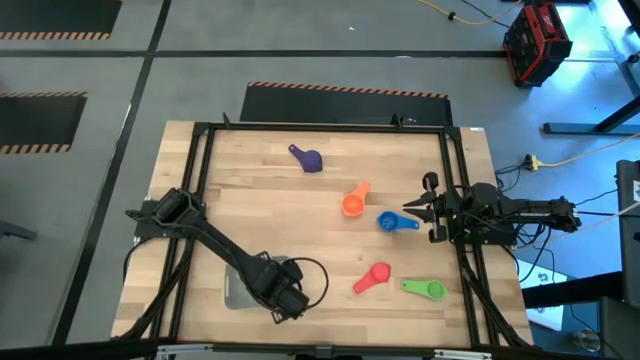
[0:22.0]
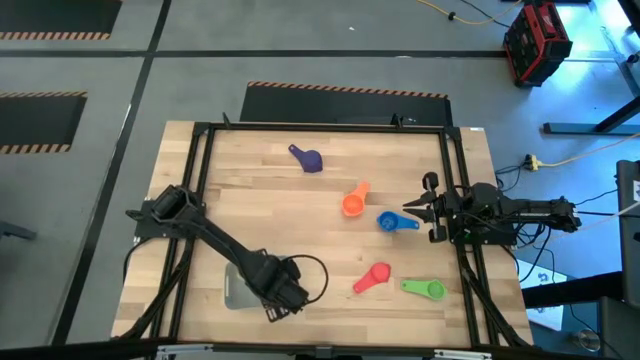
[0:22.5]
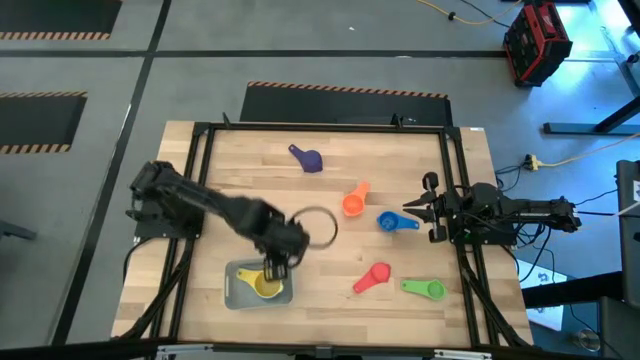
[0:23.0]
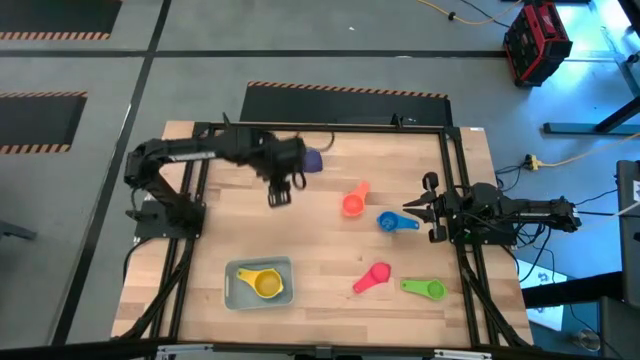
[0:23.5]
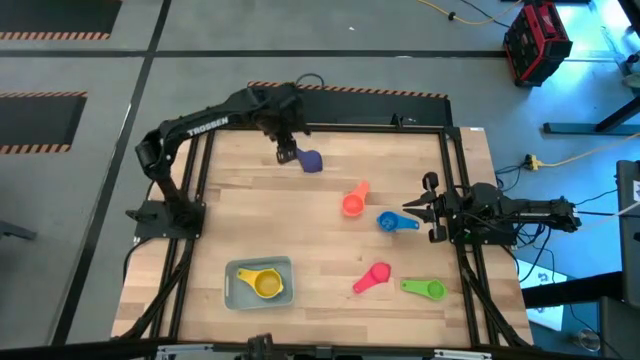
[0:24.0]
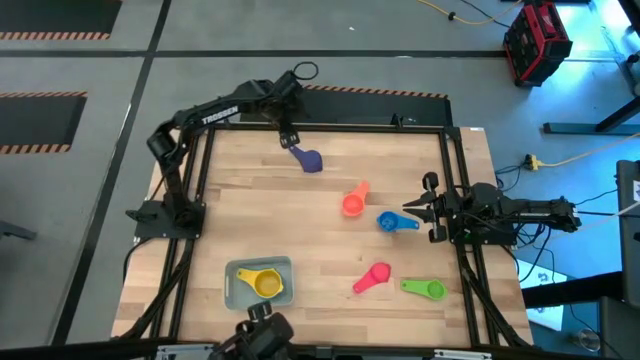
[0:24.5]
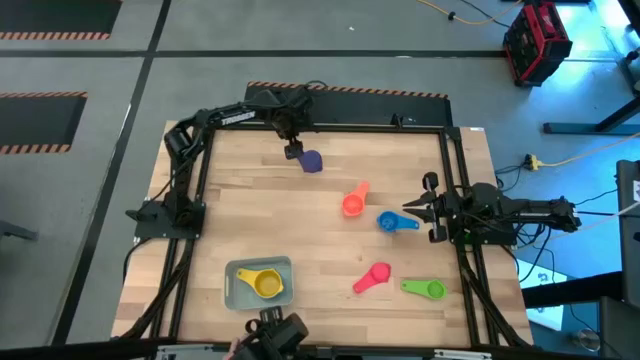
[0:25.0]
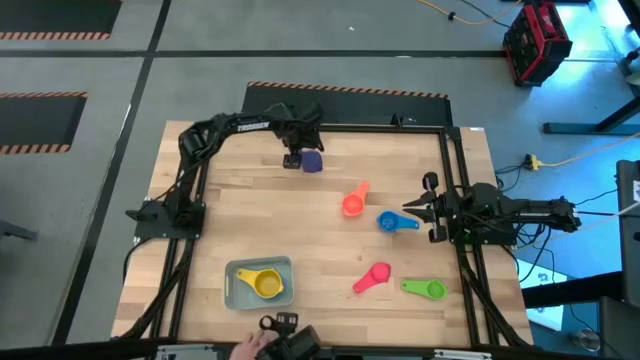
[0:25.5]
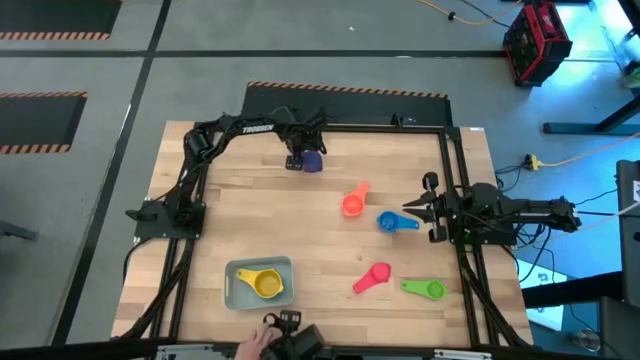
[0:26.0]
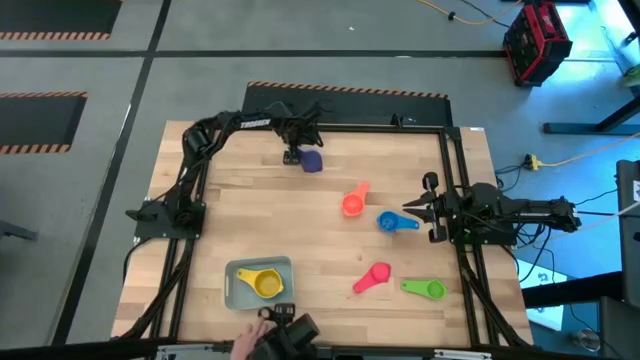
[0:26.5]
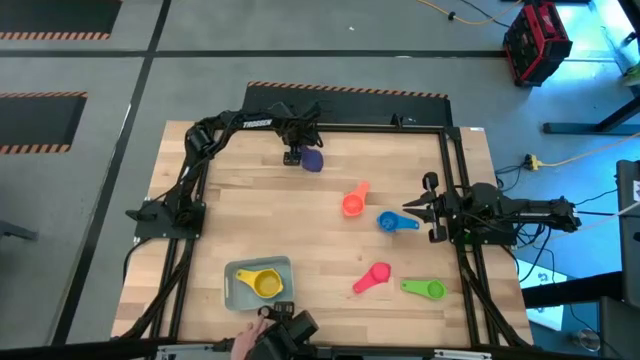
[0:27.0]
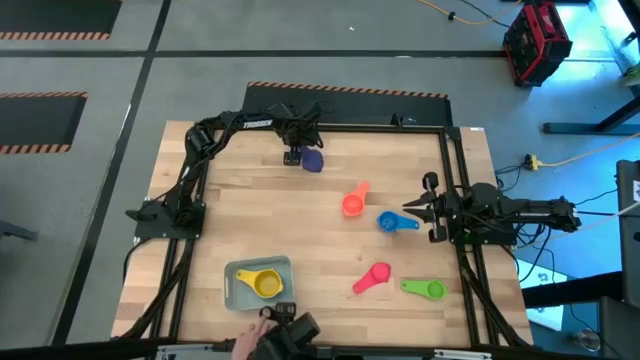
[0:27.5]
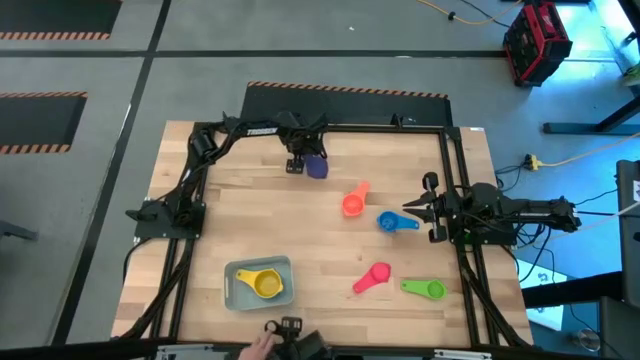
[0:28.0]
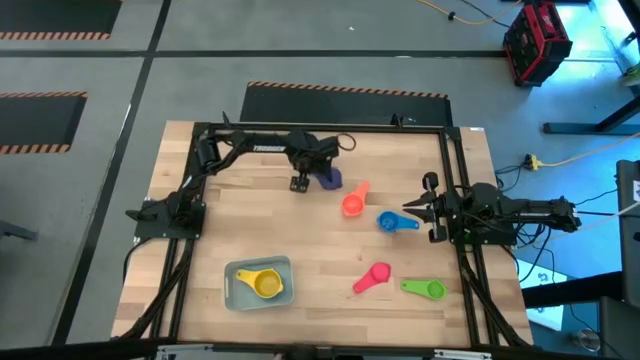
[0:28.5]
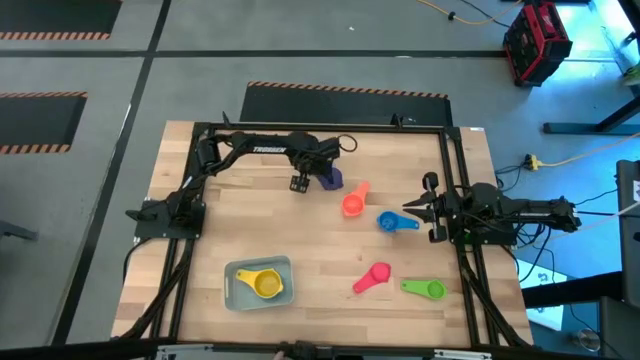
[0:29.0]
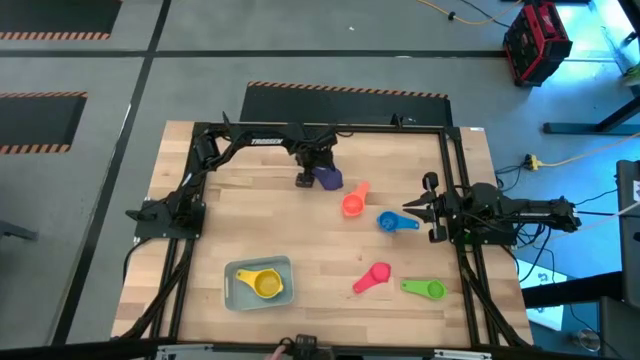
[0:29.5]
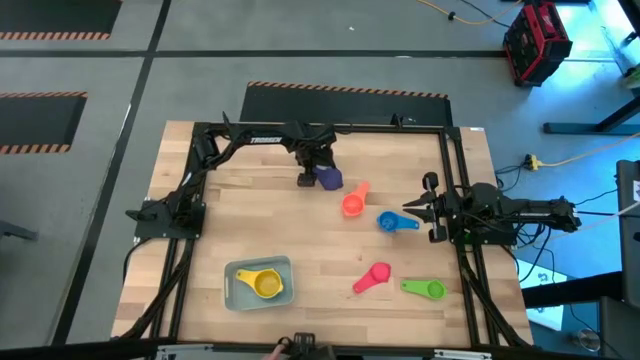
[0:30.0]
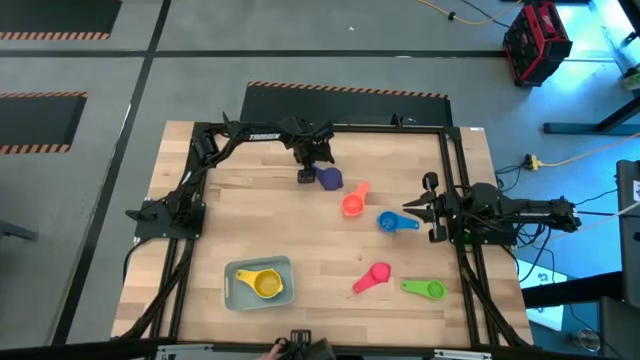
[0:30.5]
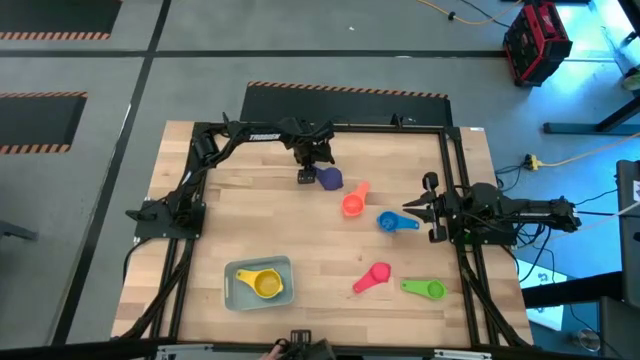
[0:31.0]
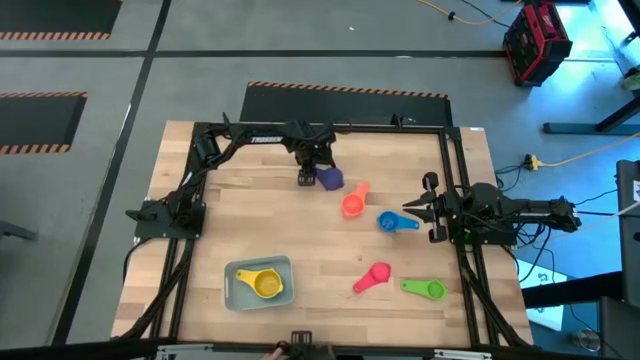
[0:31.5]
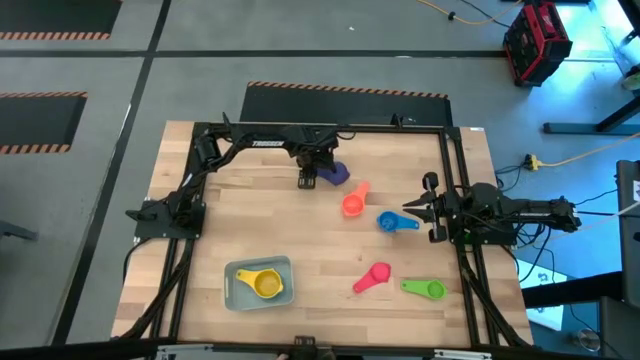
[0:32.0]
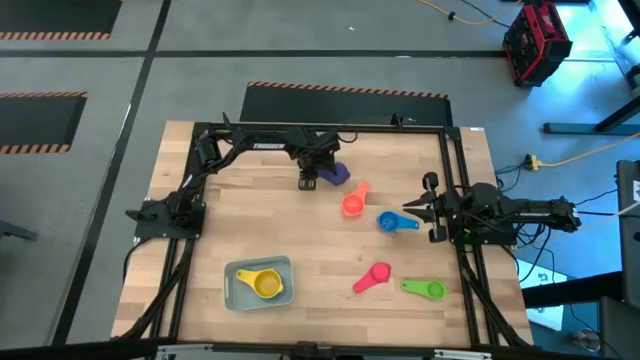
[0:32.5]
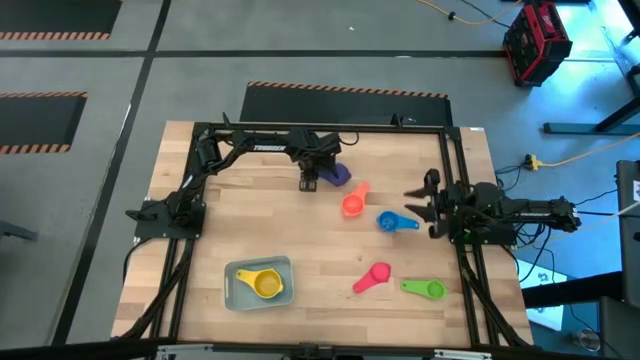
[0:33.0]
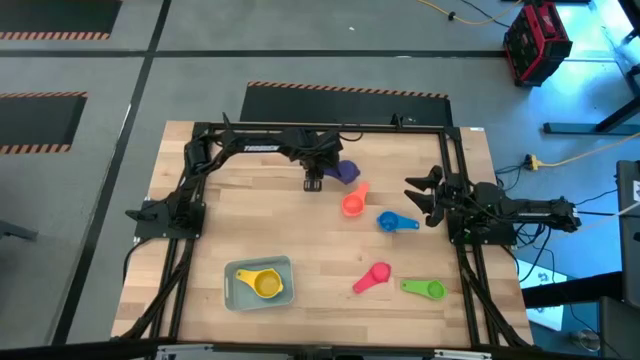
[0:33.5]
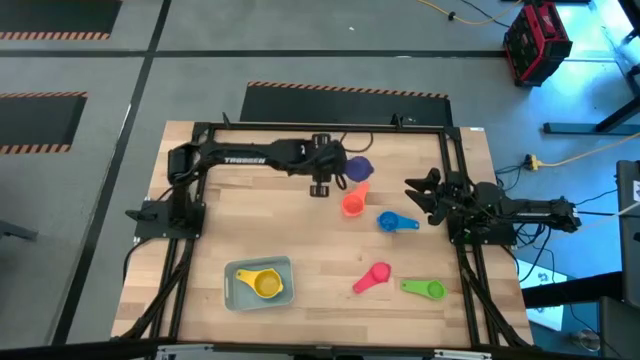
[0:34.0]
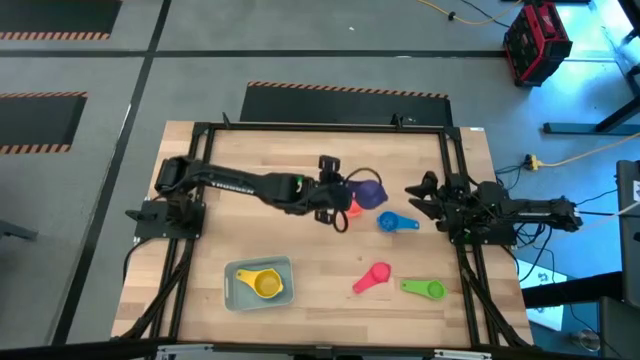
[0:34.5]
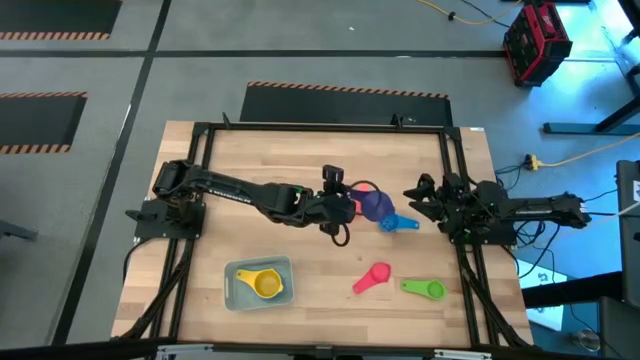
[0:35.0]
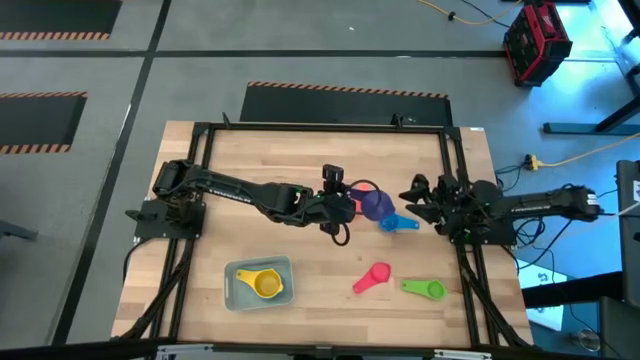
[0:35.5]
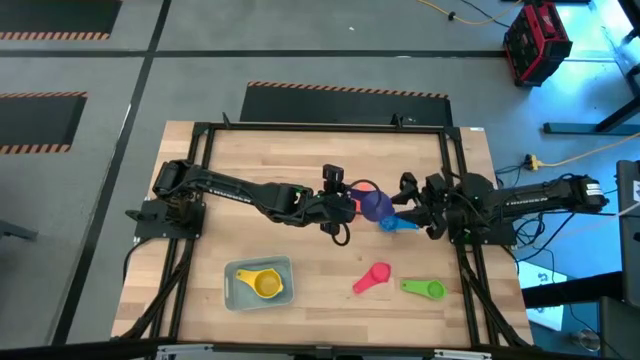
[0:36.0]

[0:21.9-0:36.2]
Task: Nest measuring cups in basket
Stack the violet measuring cup on top of the yellow measuring cup in the gray bin

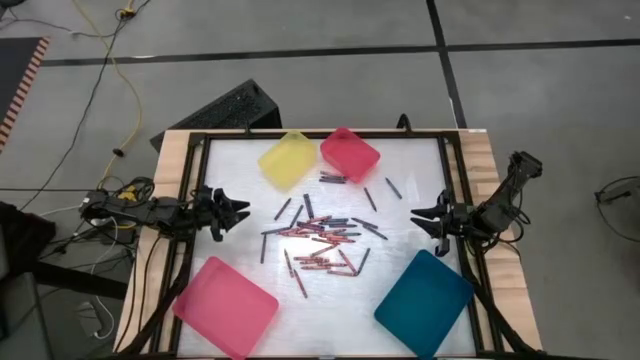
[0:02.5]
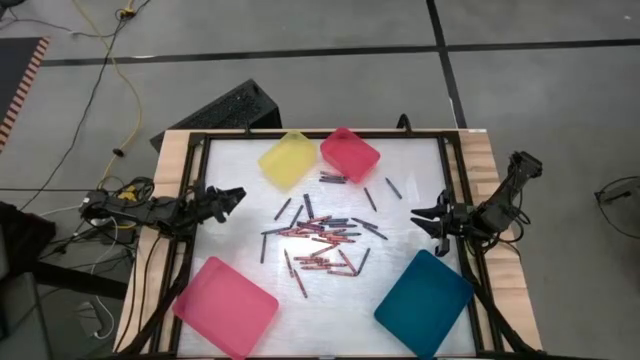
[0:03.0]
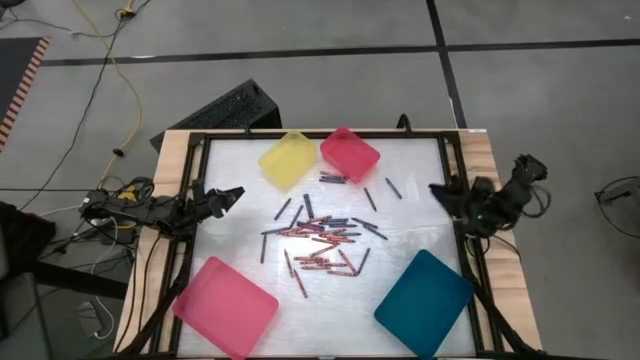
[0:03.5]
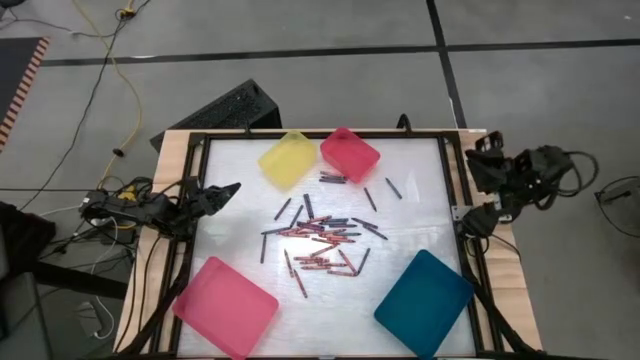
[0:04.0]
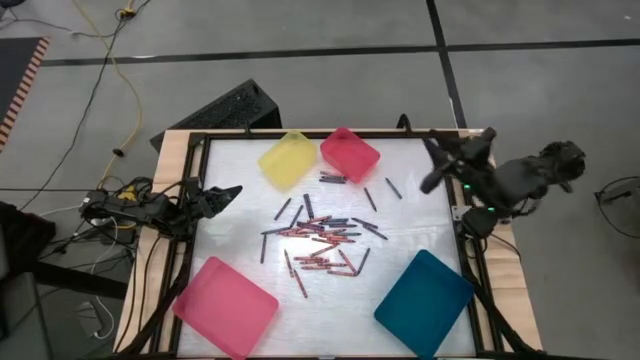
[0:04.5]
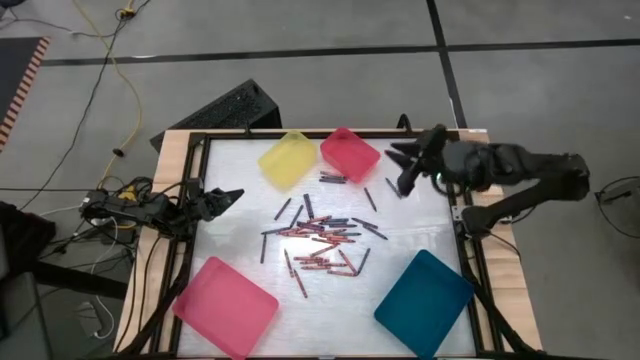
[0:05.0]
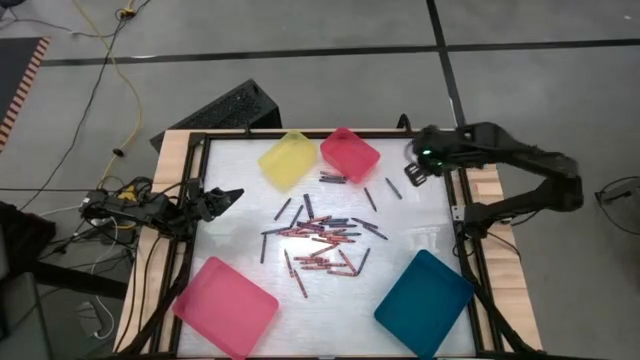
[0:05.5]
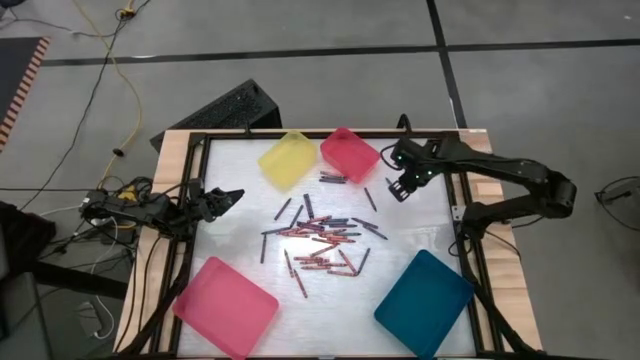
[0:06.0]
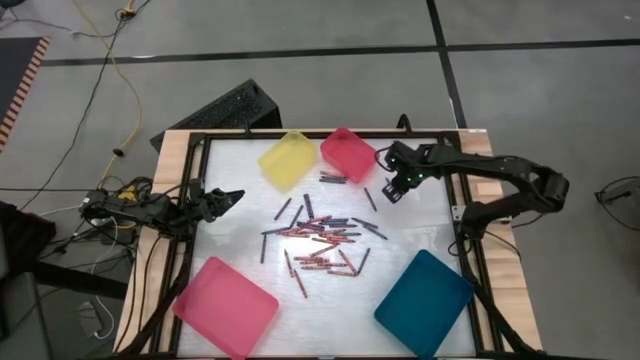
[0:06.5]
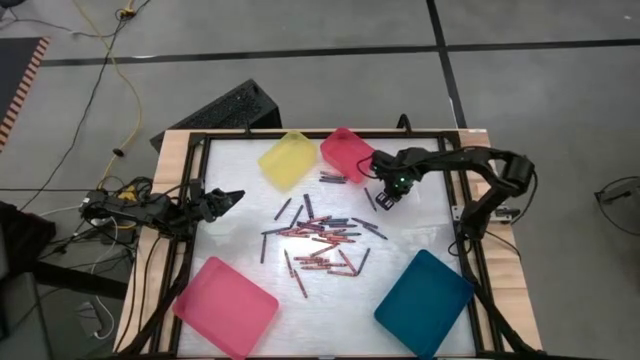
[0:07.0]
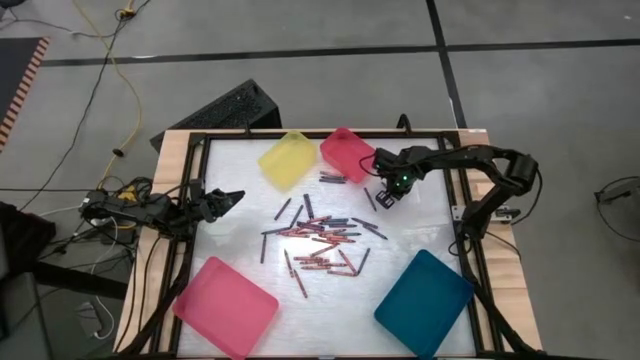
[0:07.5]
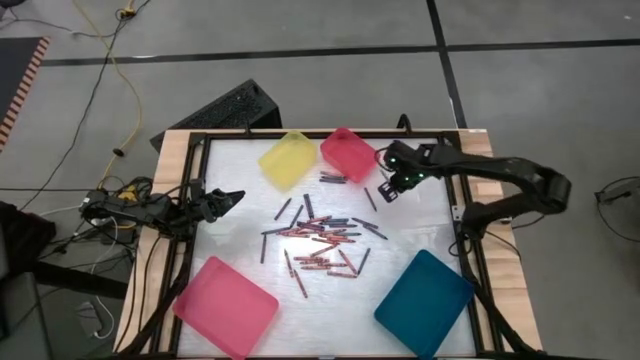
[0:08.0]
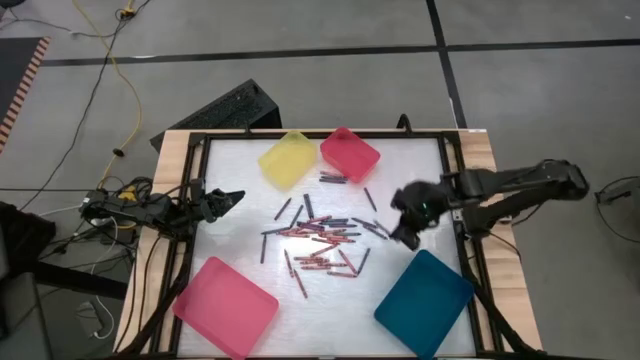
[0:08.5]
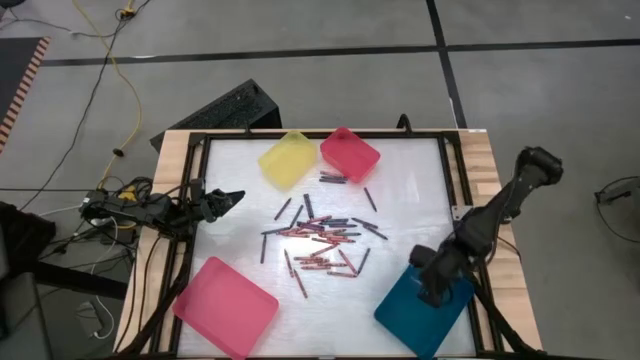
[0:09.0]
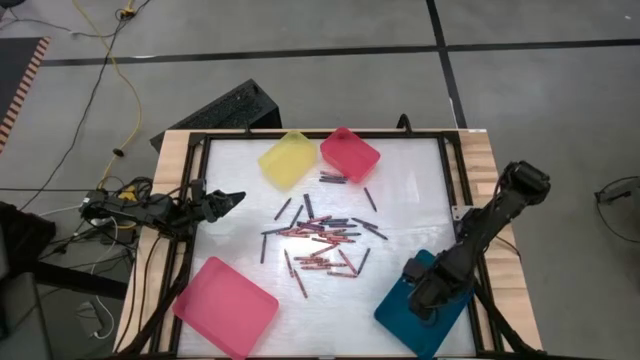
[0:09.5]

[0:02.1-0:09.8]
Task: Sort crayons
Put the blue crayon into the blue bin
